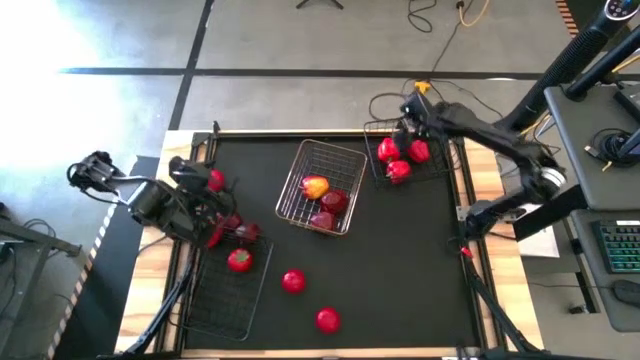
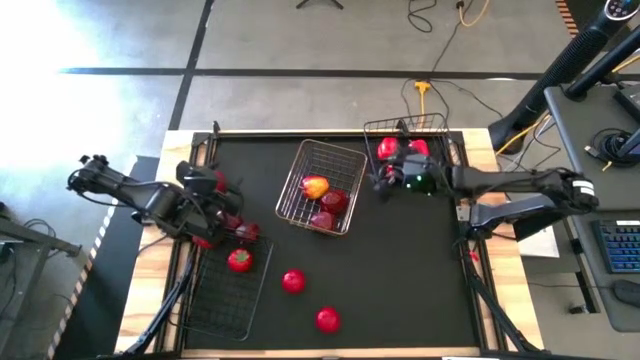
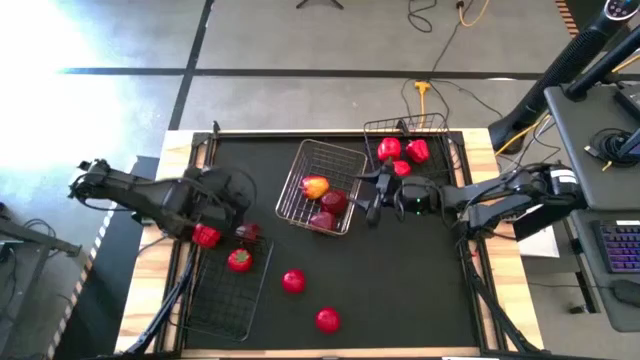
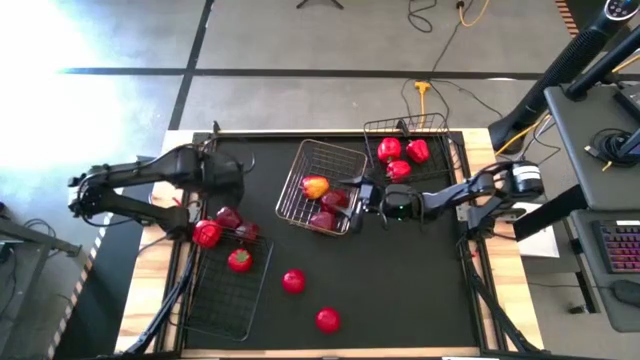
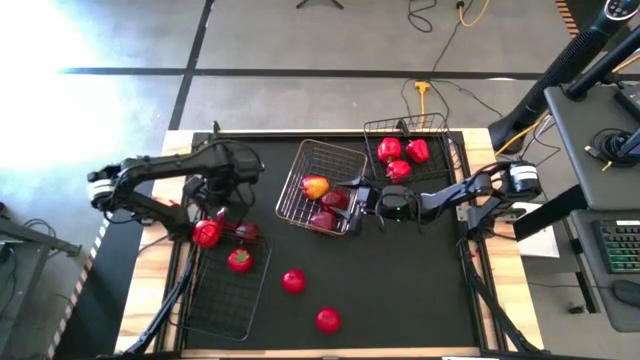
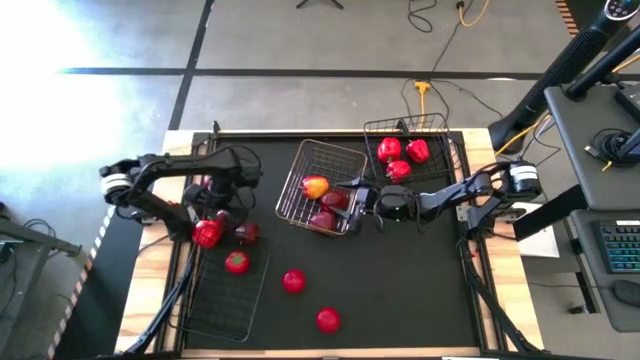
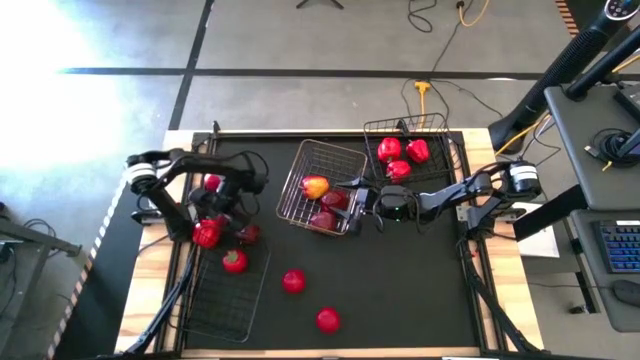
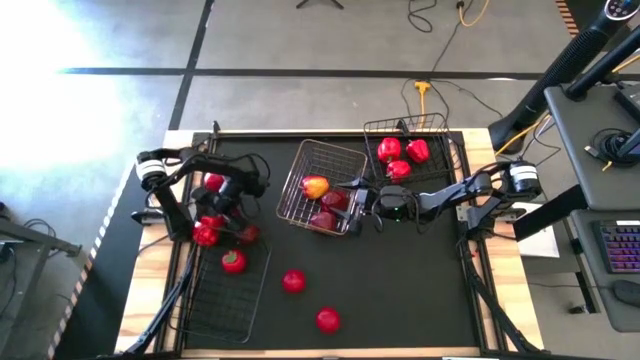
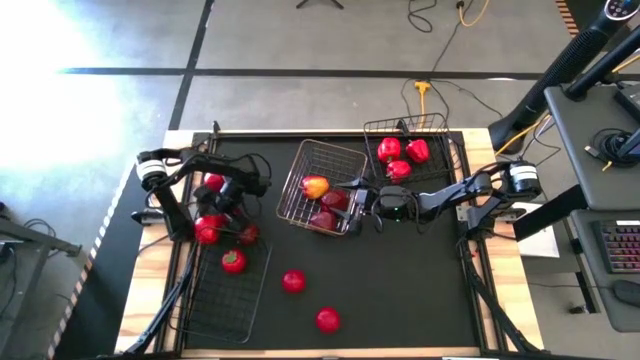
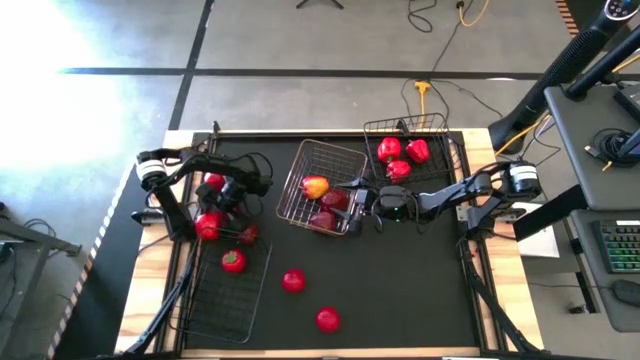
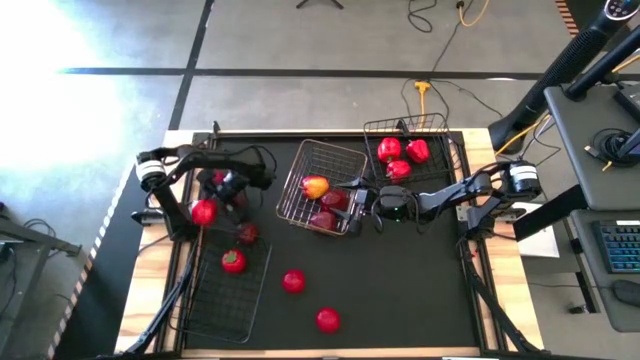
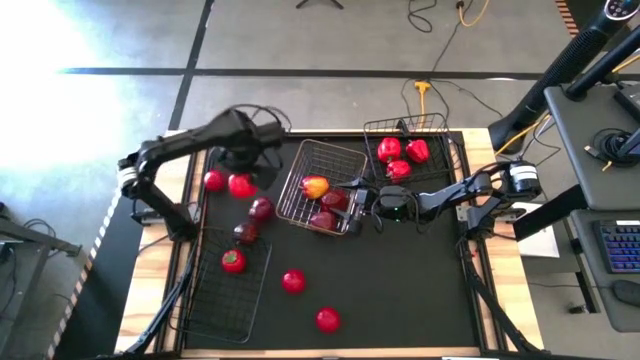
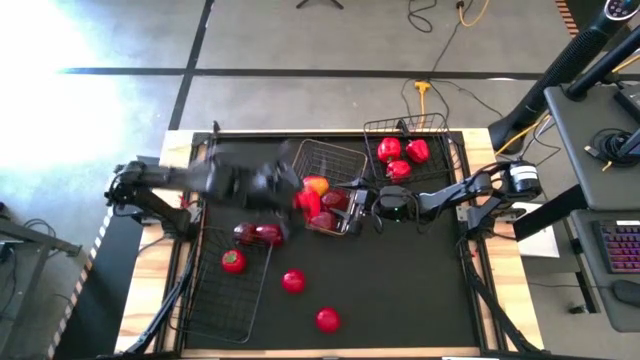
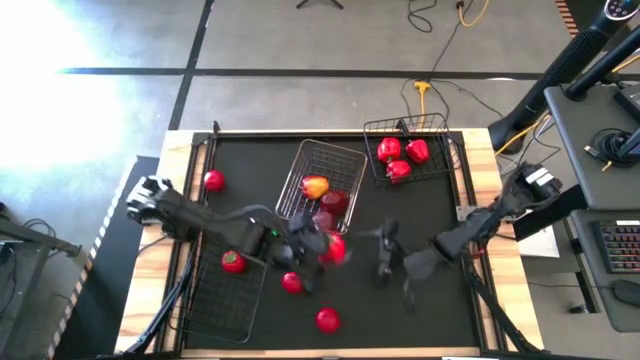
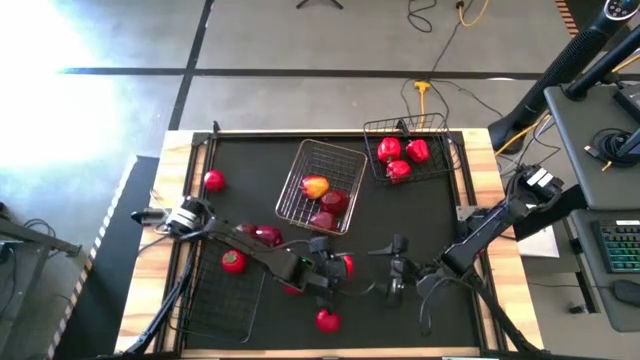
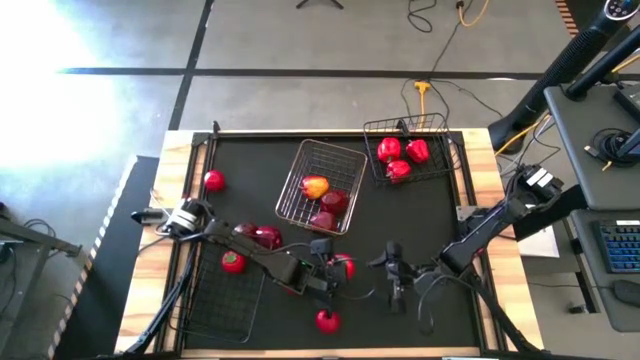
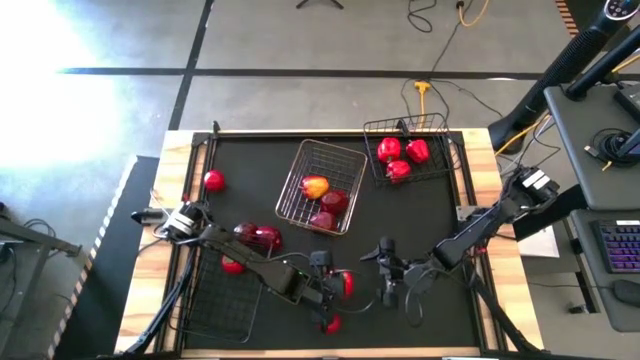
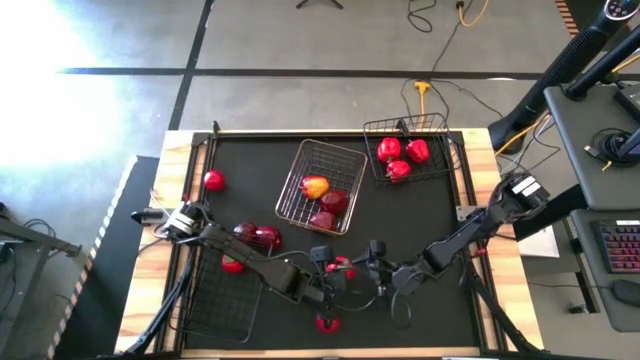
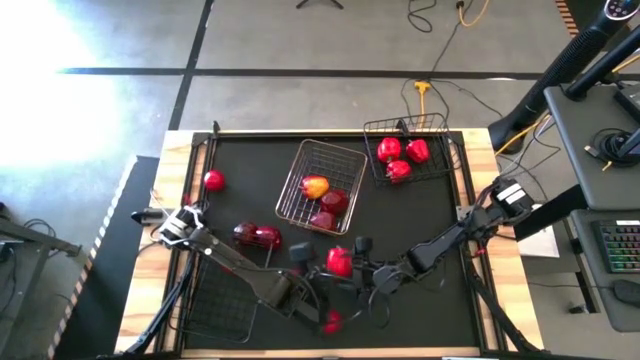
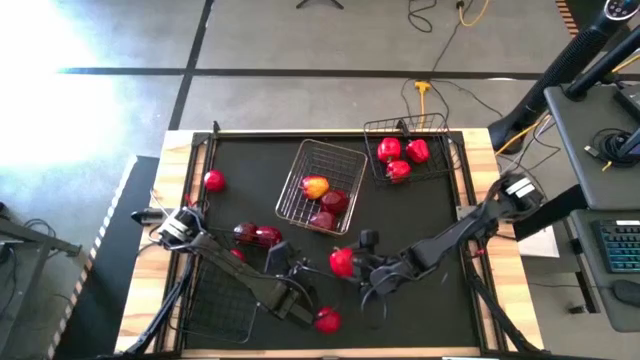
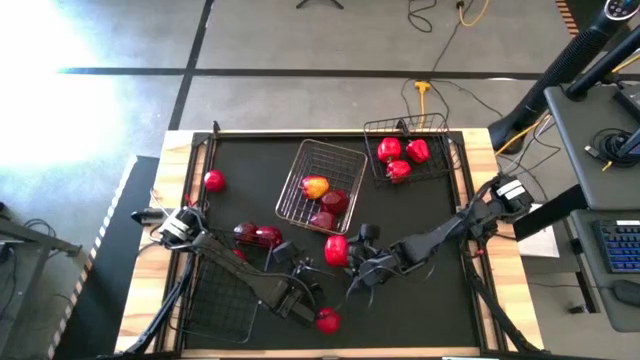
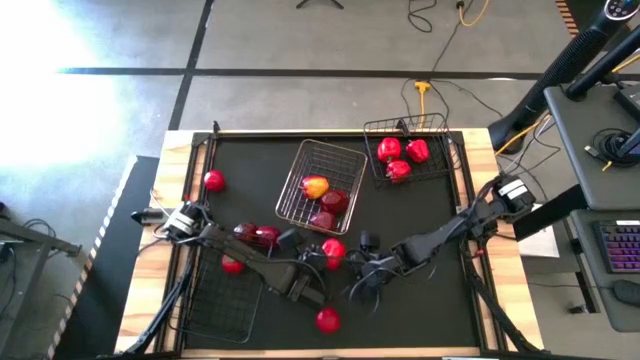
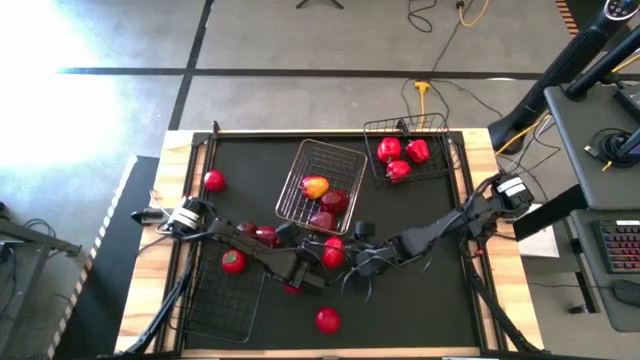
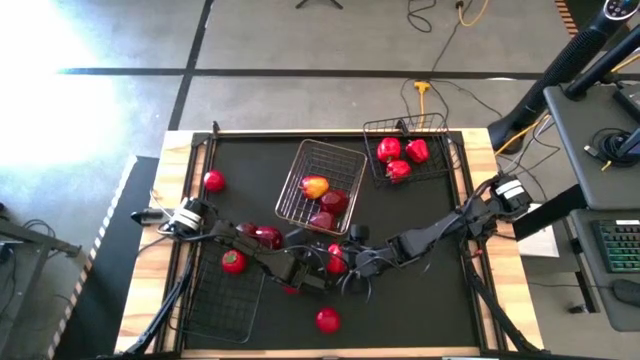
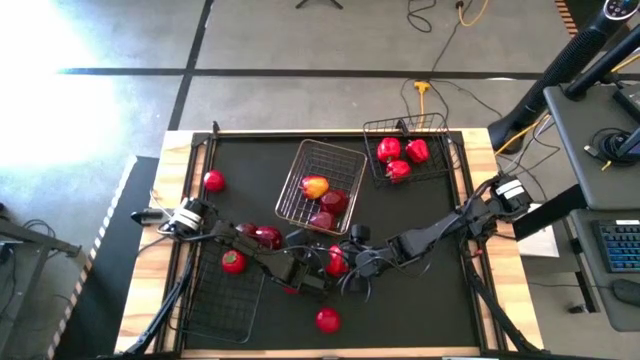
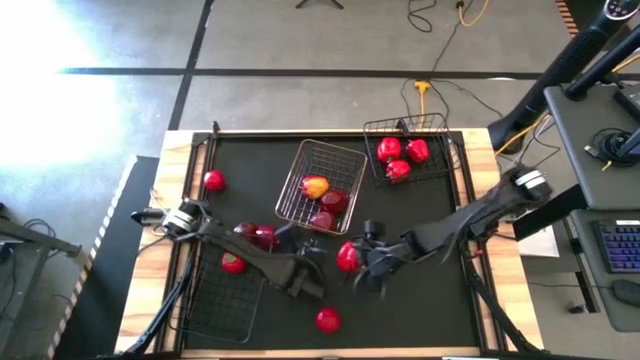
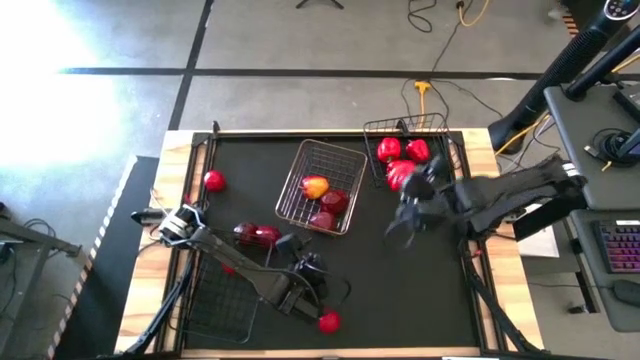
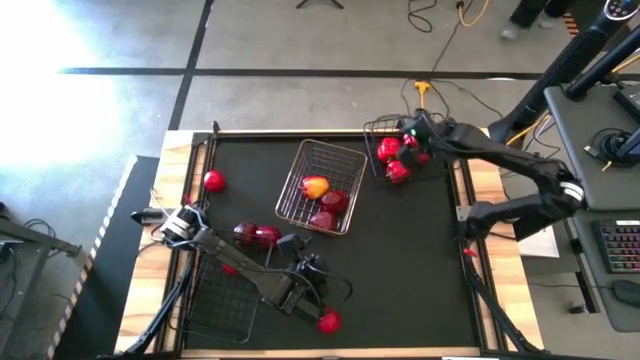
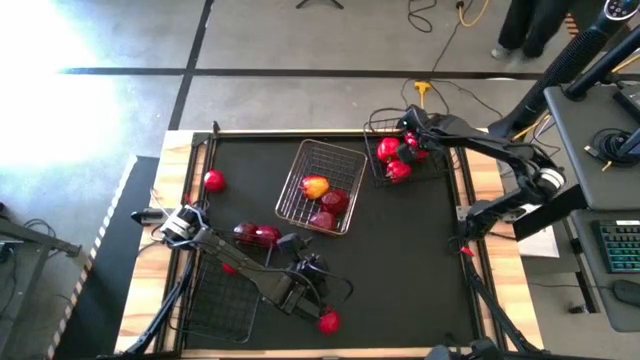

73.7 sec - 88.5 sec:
Task: Sort produce into baskets
Put the red bell pepper into the top black wire basket

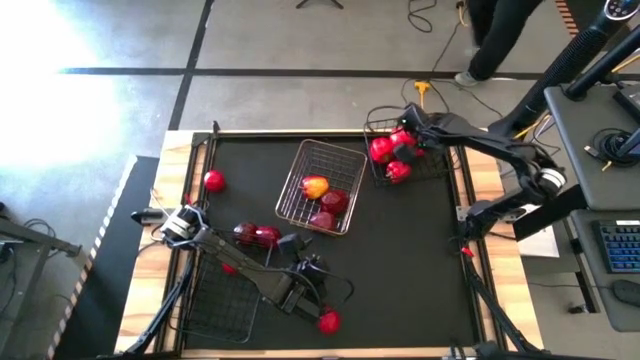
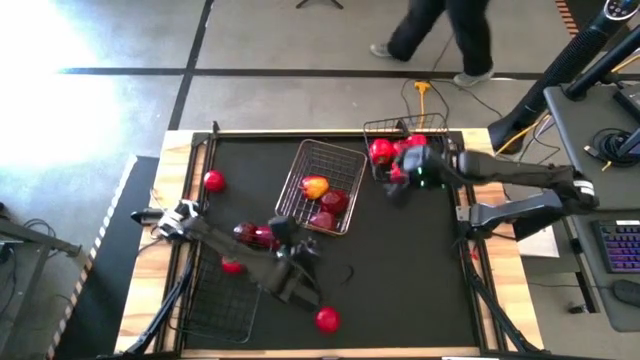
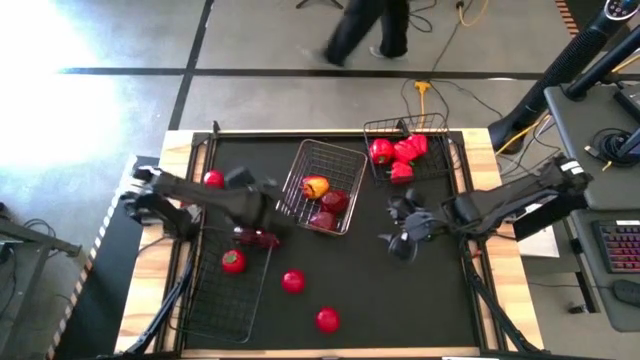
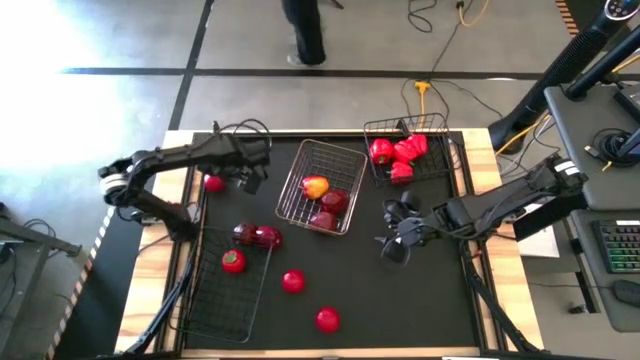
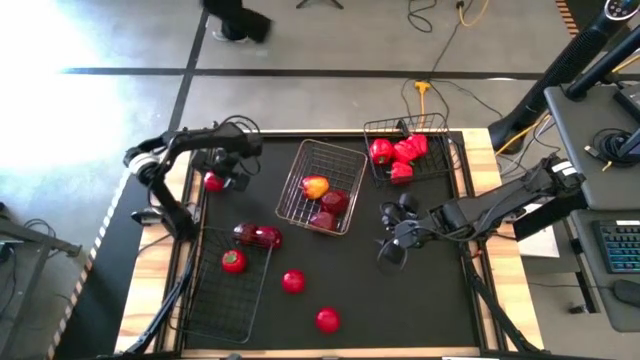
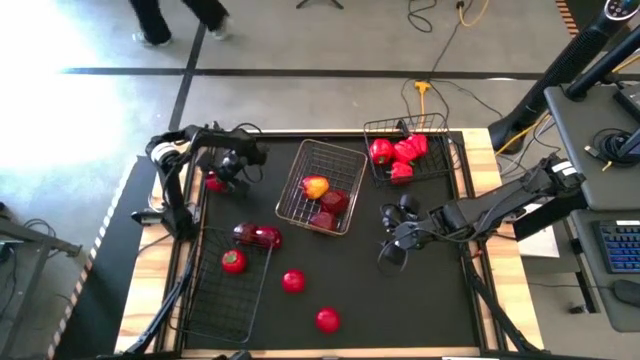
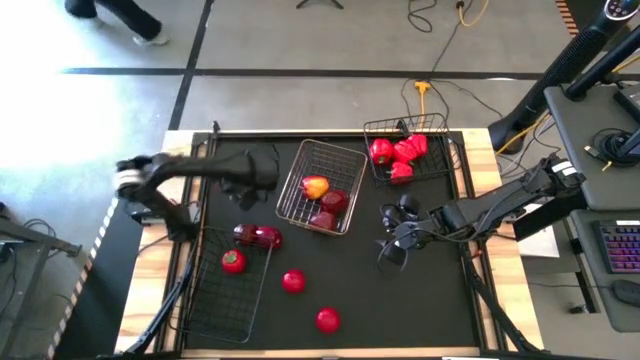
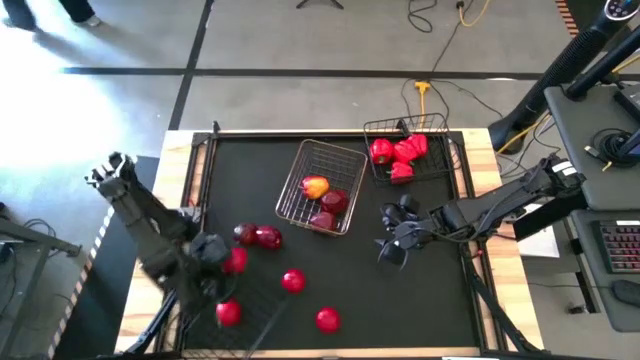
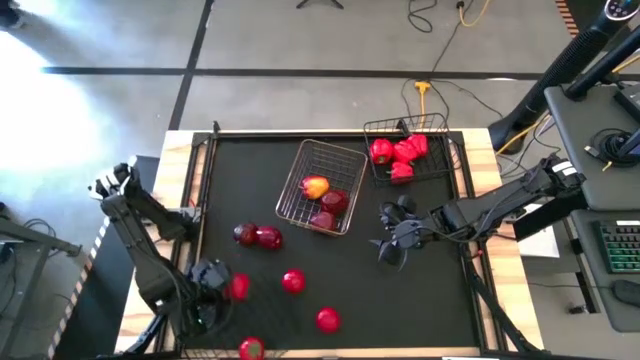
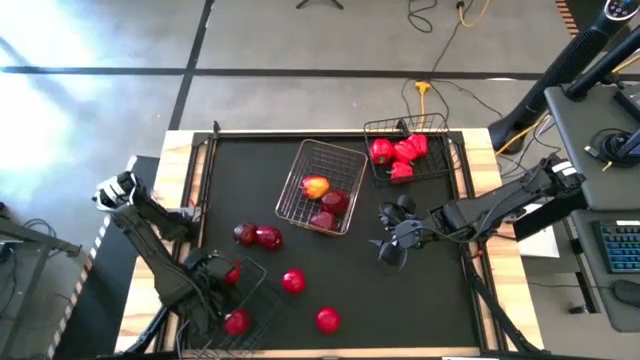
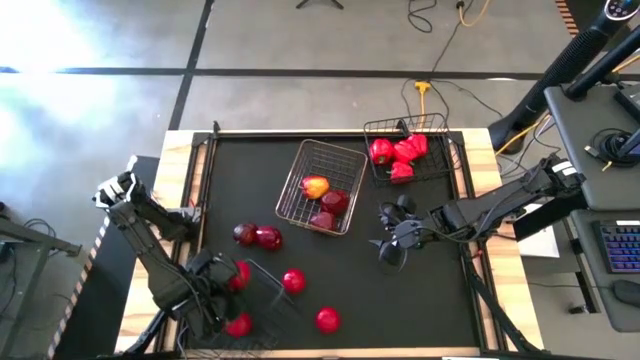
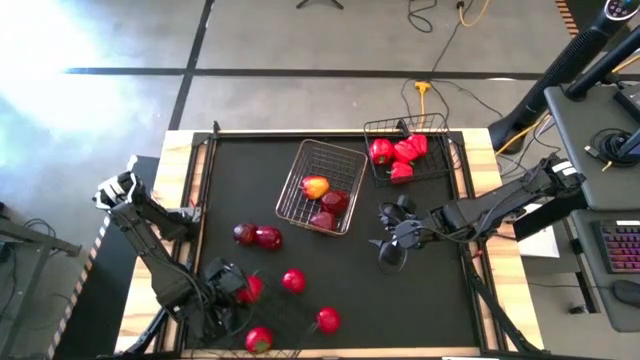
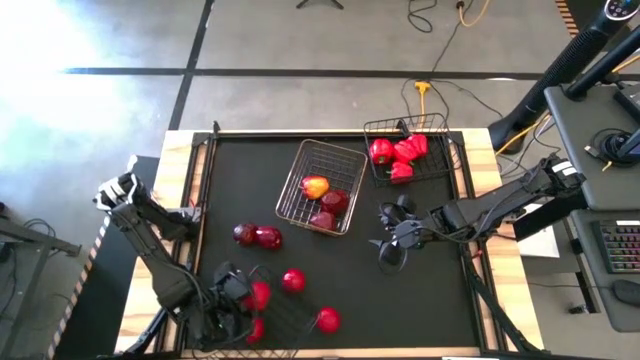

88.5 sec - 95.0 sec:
Put the red tomato into the bottom black wire basket
